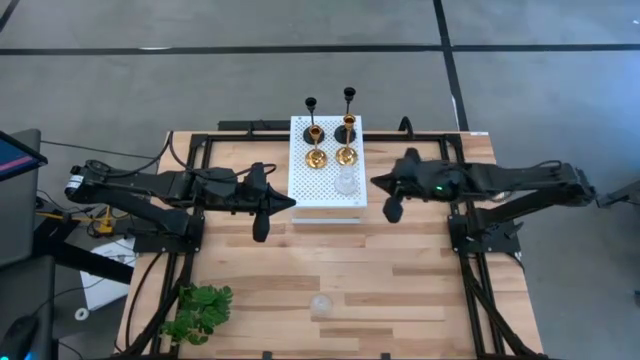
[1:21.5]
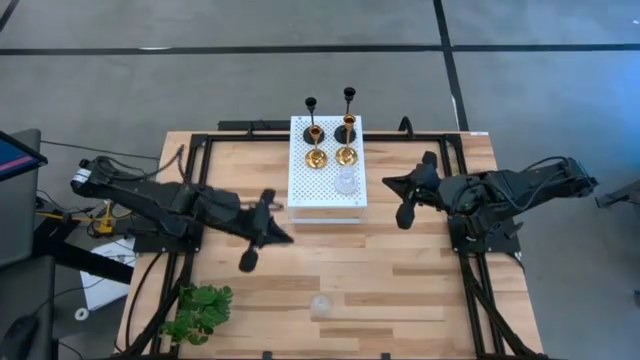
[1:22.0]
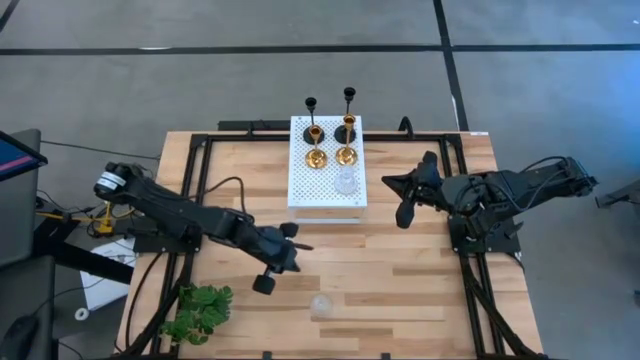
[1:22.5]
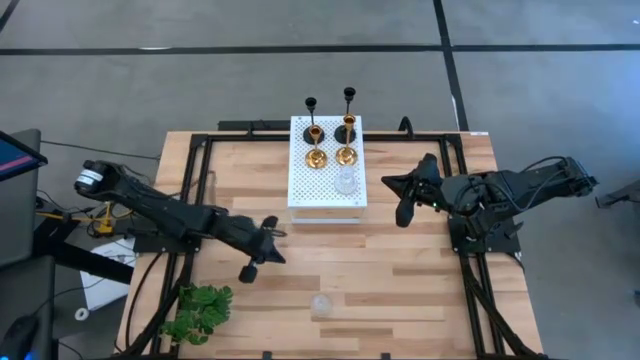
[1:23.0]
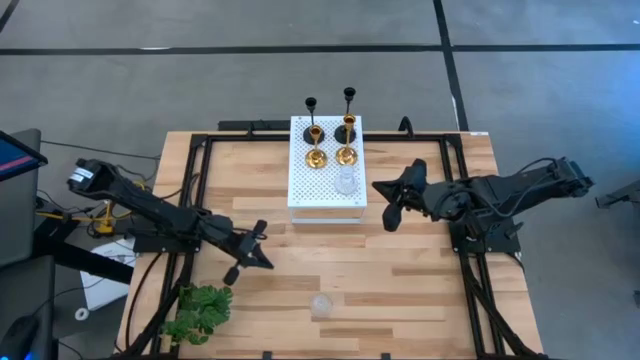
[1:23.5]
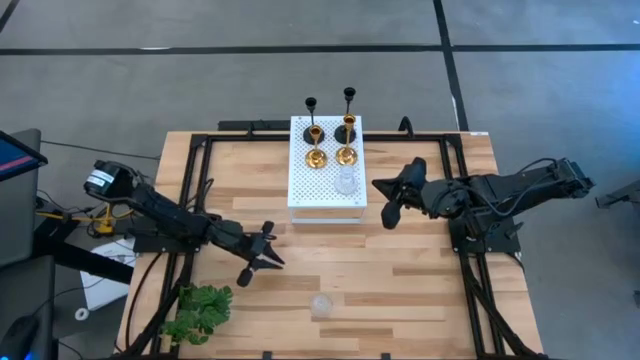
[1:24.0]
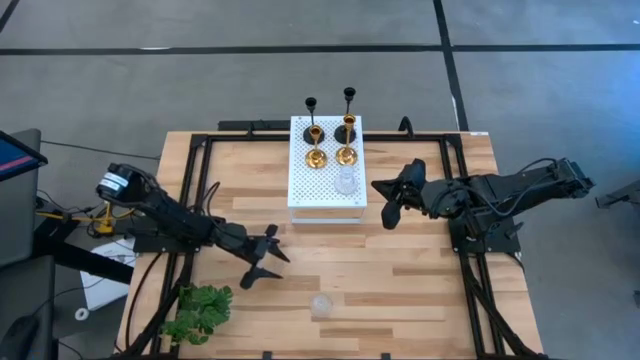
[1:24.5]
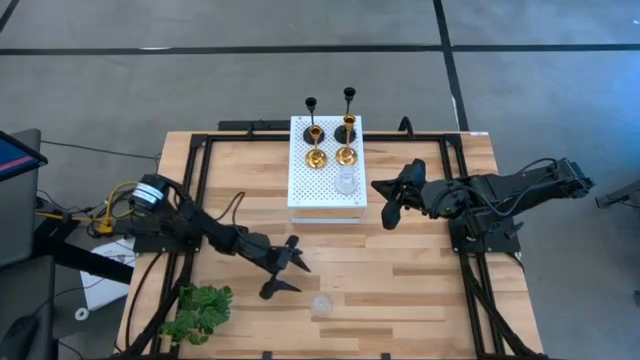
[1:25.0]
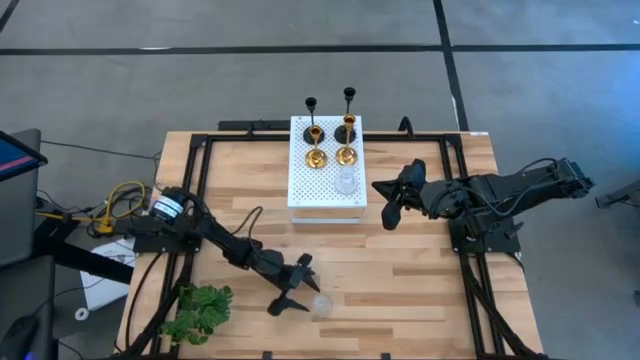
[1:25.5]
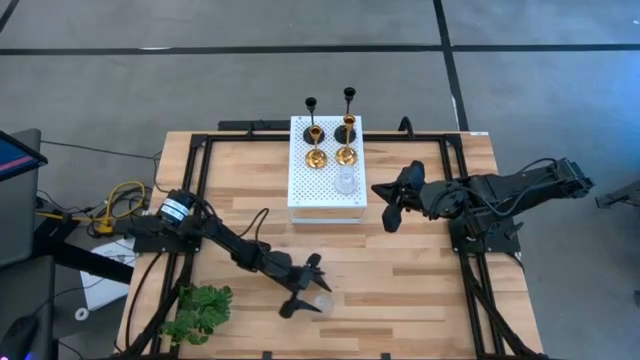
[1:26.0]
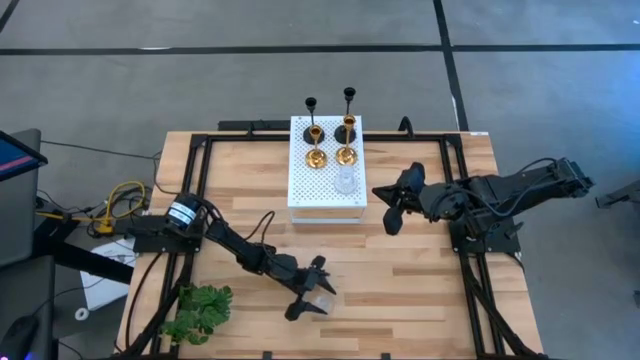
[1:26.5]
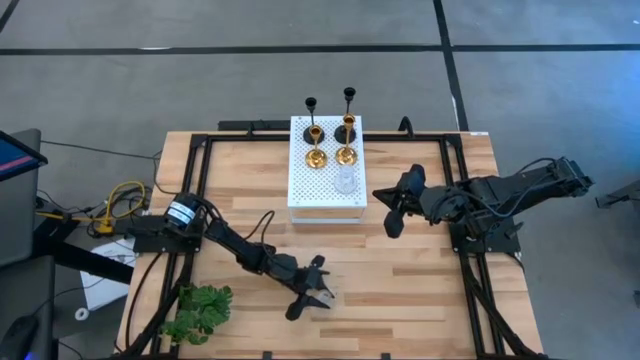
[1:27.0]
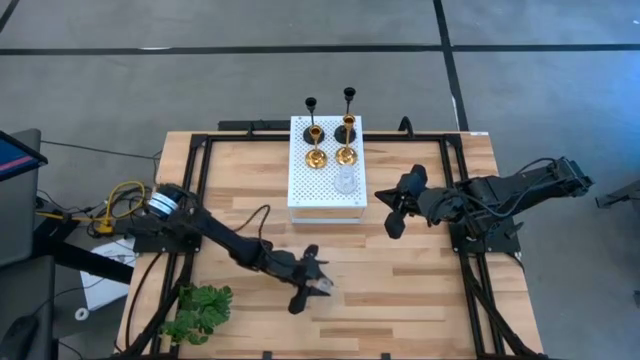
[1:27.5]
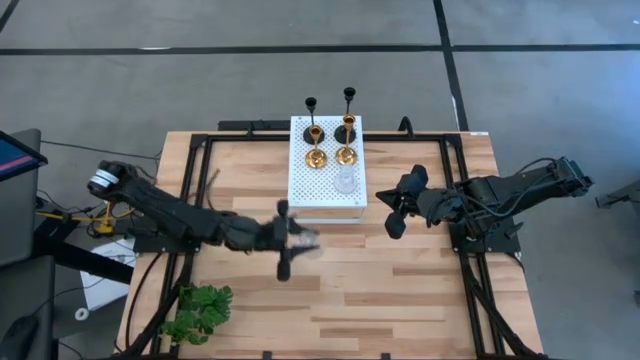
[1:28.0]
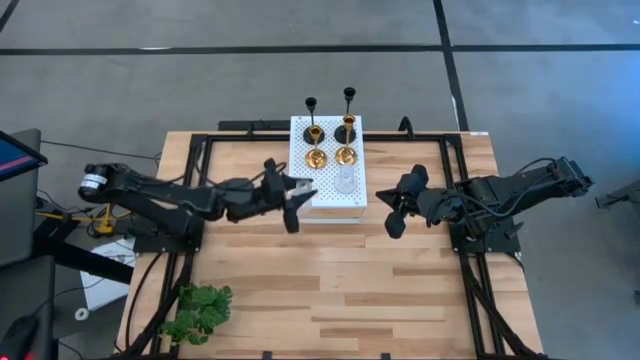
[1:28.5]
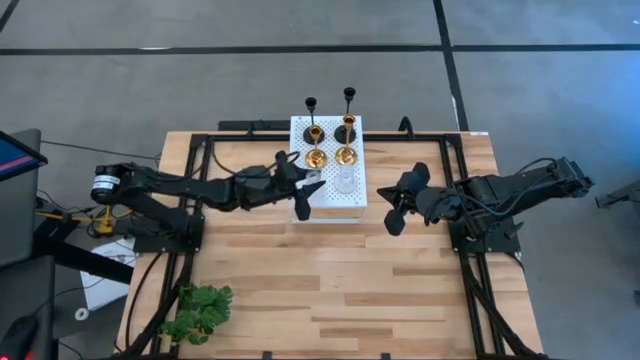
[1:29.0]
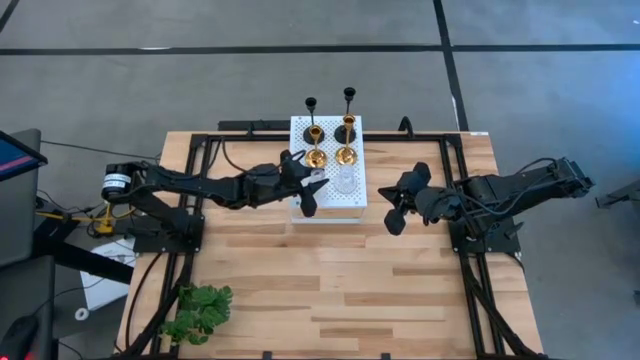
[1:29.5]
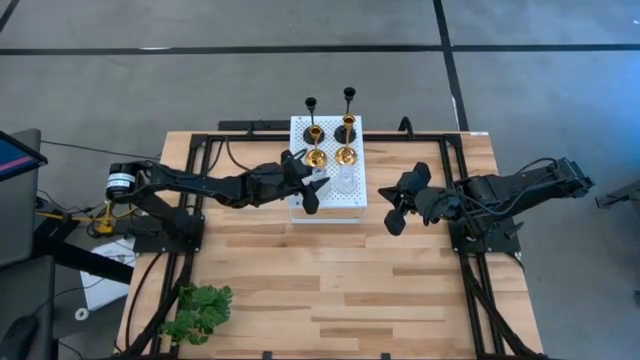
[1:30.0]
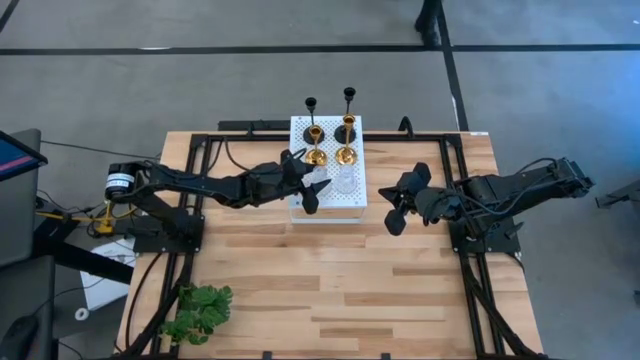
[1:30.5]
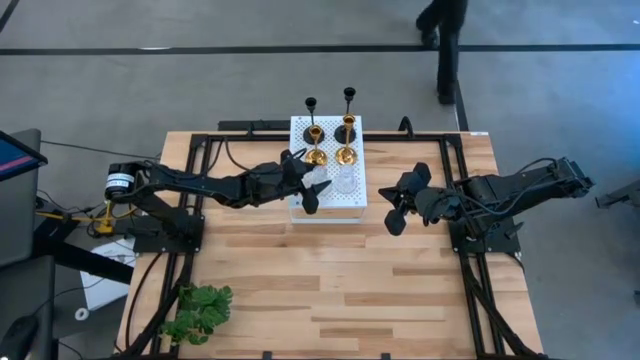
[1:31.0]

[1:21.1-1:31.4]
Task: Pick & Place candle stick holders
Put the transparent candle holder on the shelf

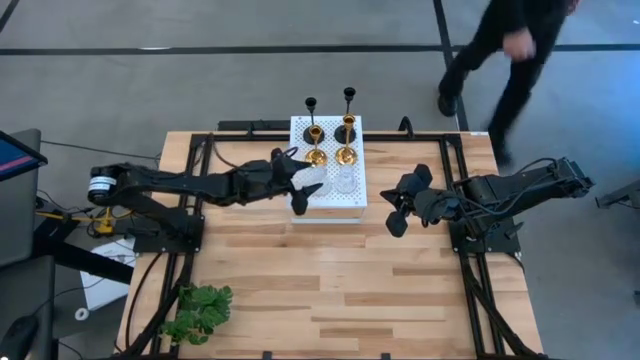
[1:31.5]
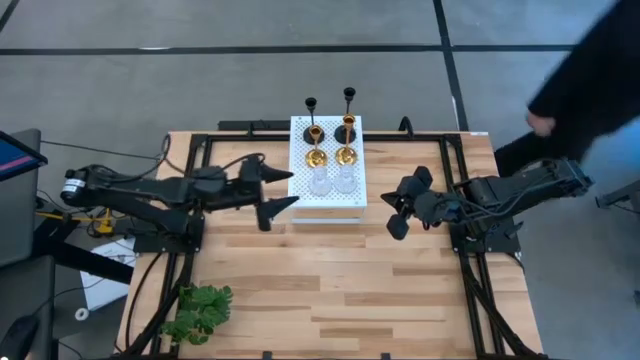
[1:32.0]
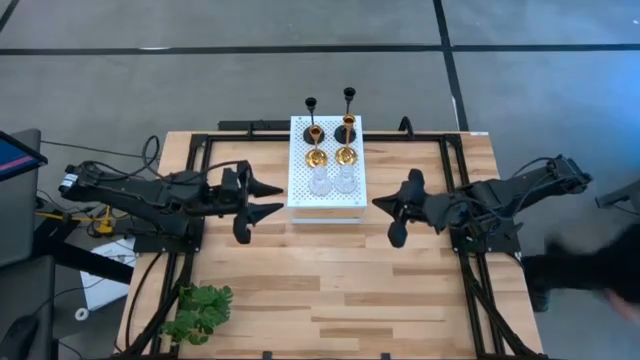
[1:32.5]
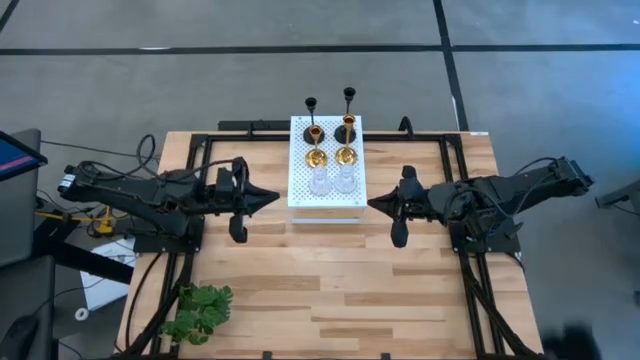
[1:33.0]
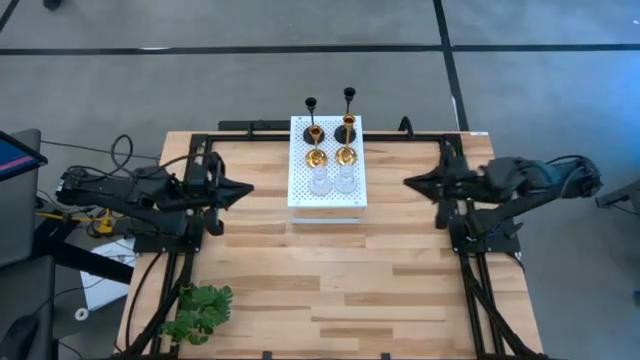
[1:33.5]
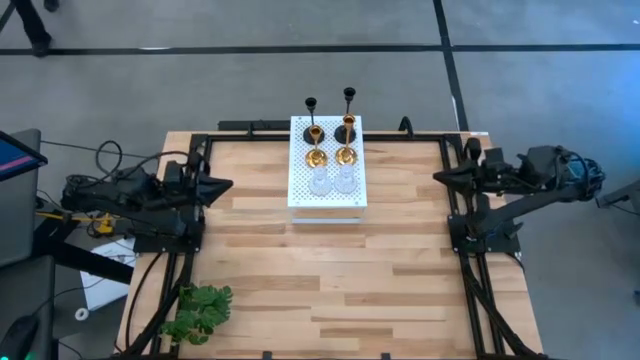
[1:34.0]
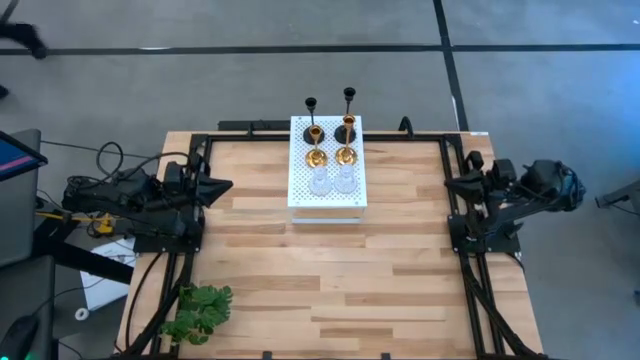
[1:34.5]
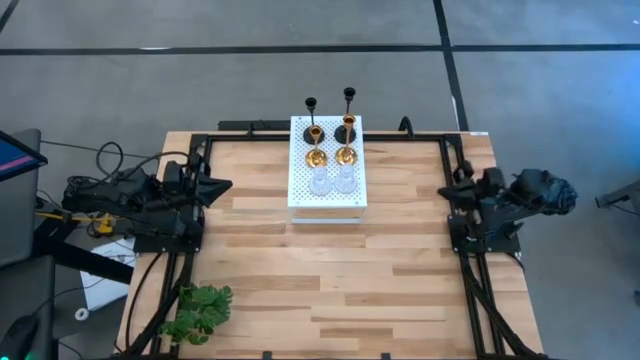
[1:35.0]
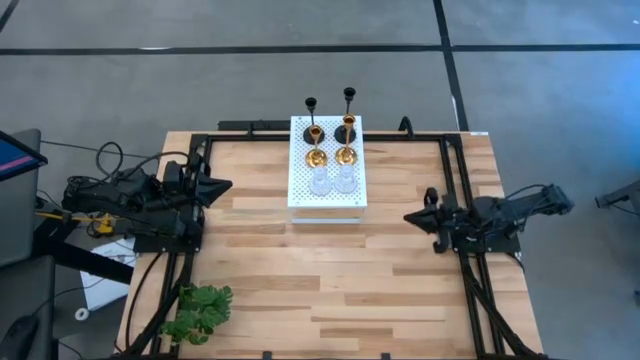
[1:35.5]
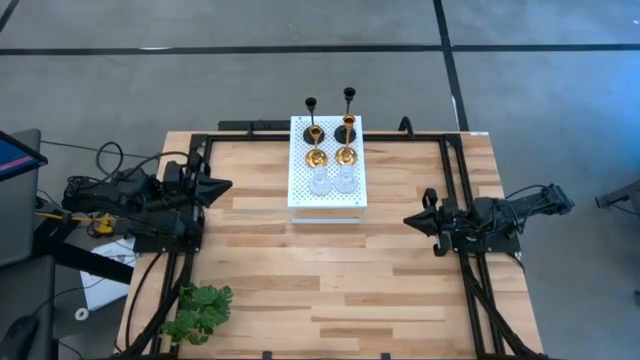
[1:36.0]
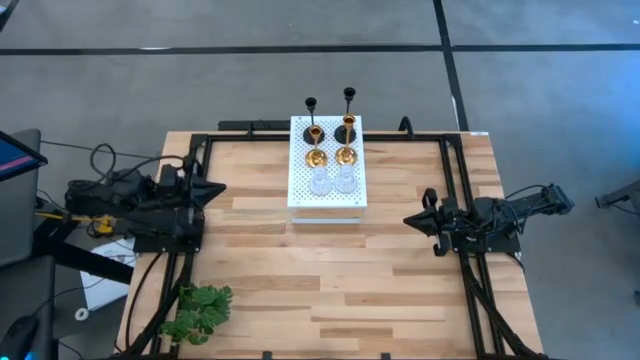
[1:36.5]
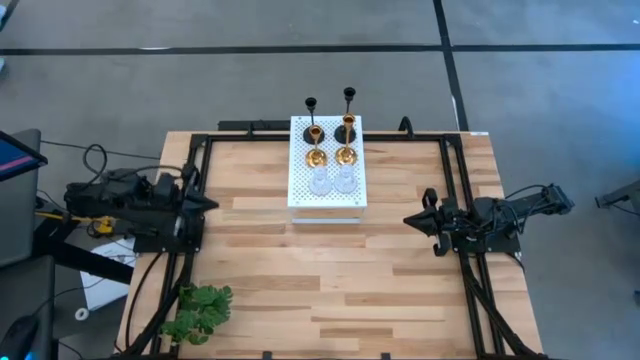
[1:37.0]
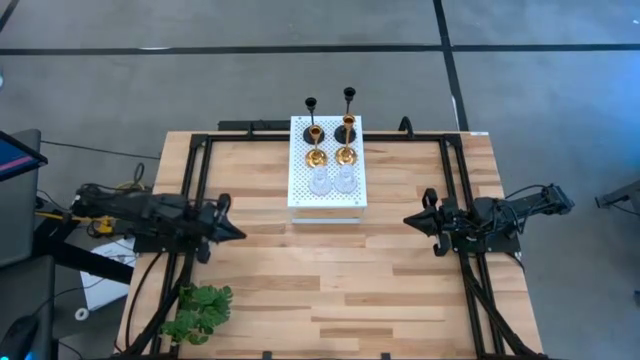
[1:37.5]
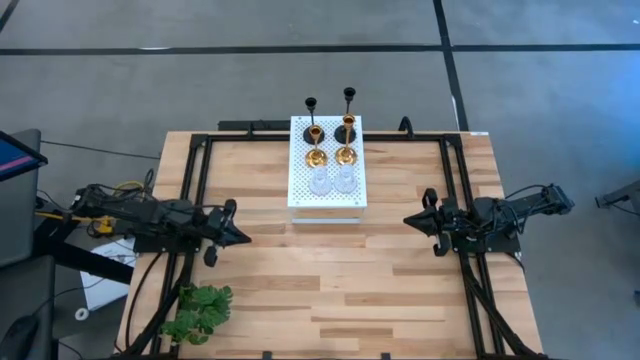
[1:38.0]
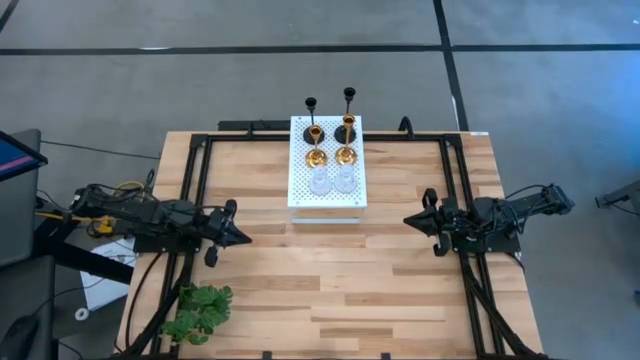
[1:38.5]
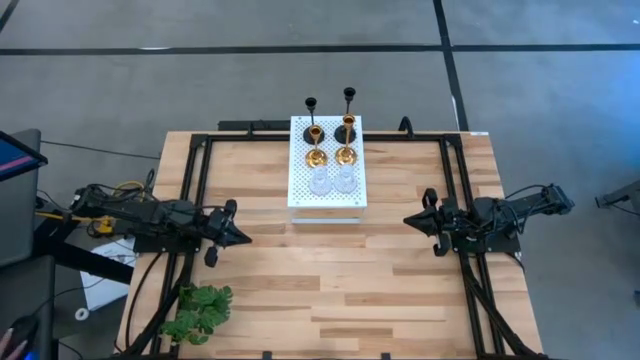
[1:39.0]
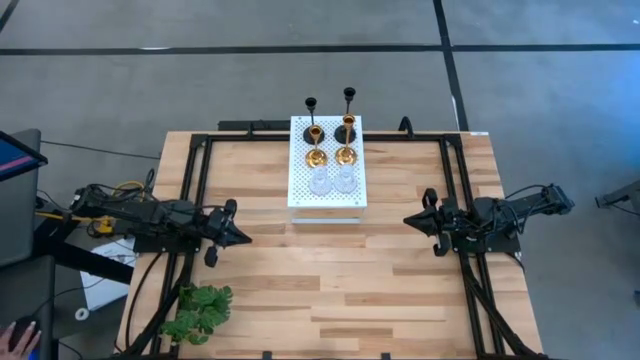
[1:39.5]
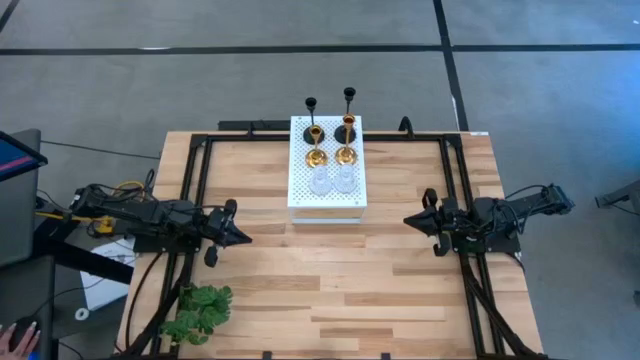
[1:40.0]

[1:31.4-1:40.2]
Return to Home Position

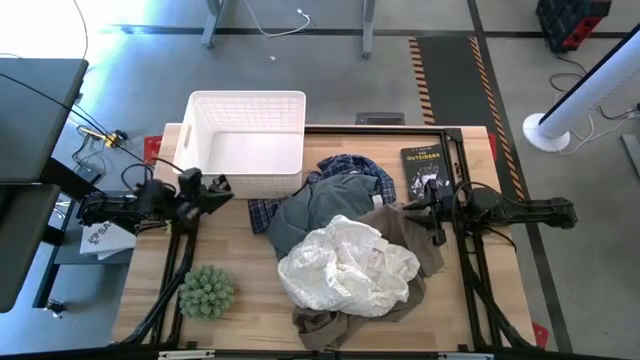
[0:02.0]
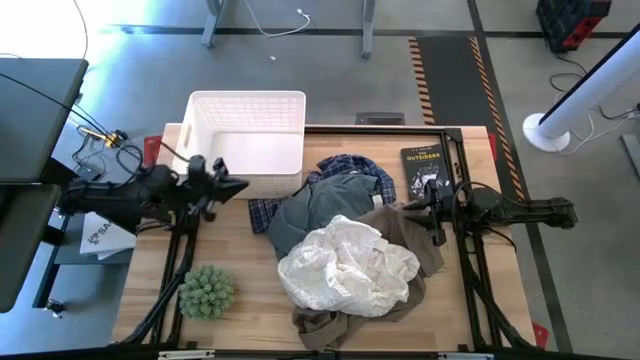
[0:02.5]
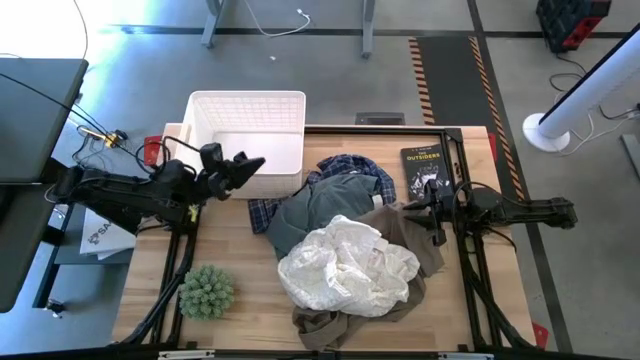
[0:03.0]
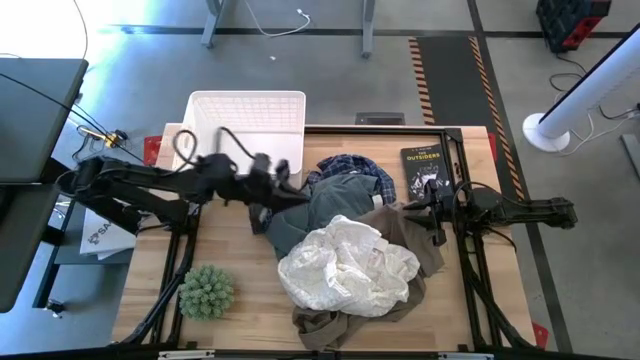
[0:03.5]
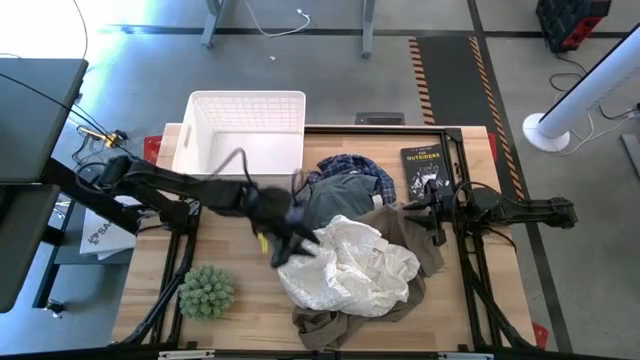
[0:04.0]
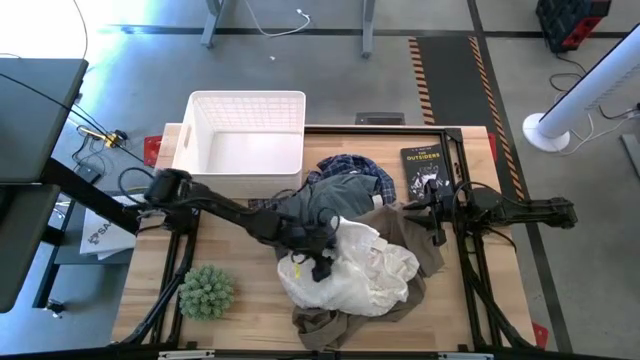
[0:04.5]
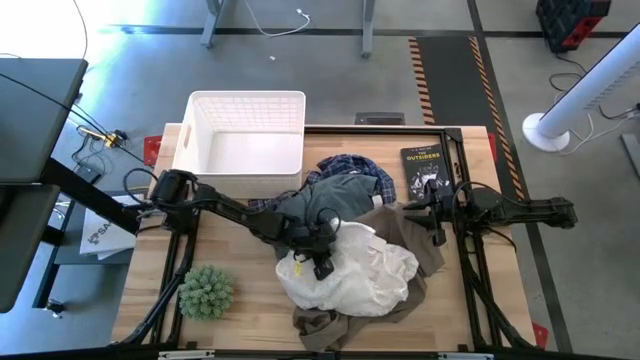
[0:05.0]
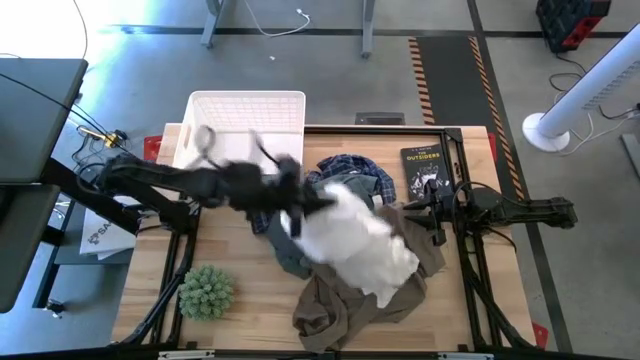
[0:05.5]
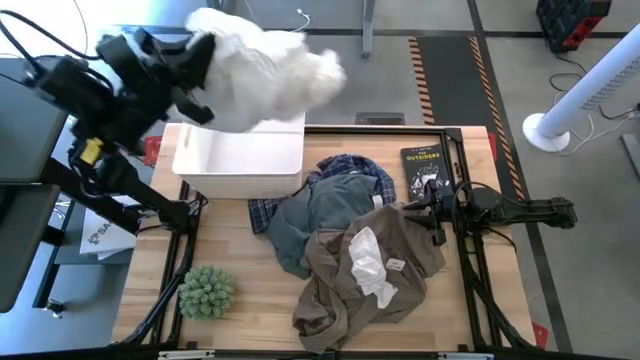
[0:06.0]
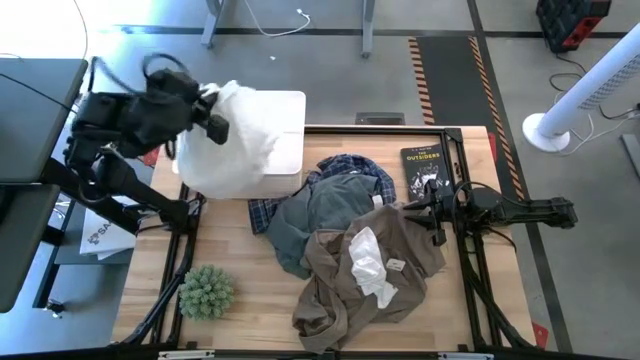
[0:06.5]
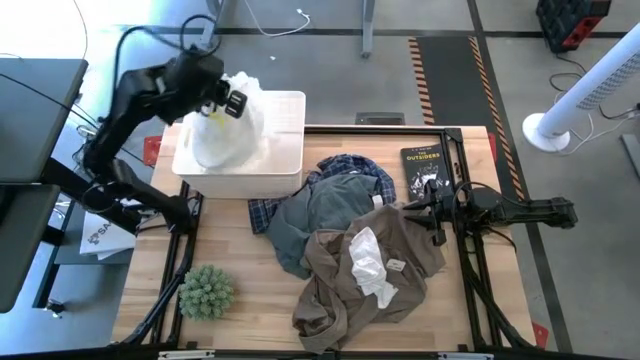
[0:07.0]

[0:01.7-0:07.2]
Task: Sort clothes
Put the white dress into the white laundry bin
